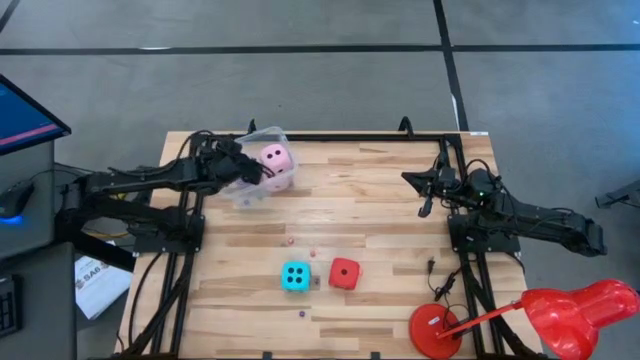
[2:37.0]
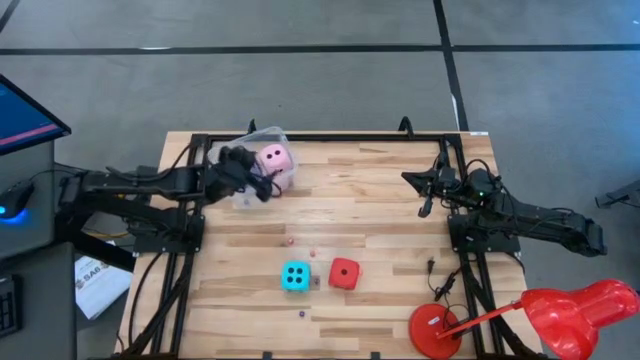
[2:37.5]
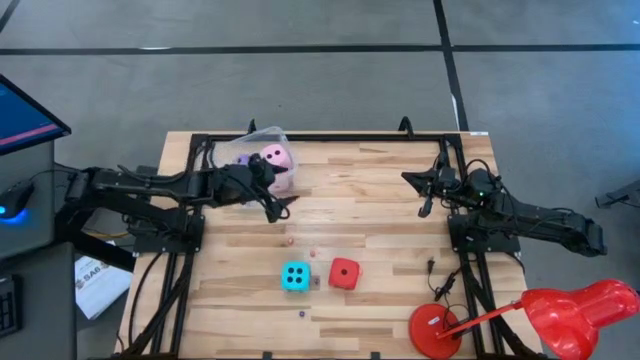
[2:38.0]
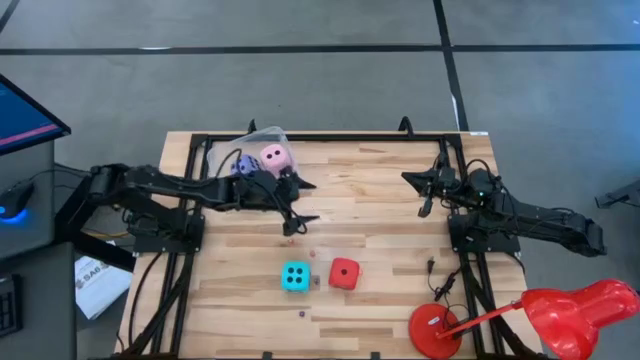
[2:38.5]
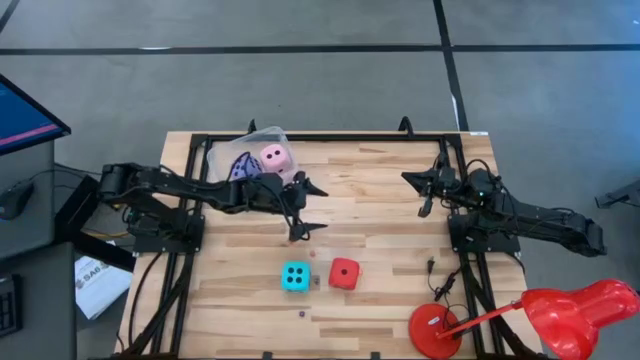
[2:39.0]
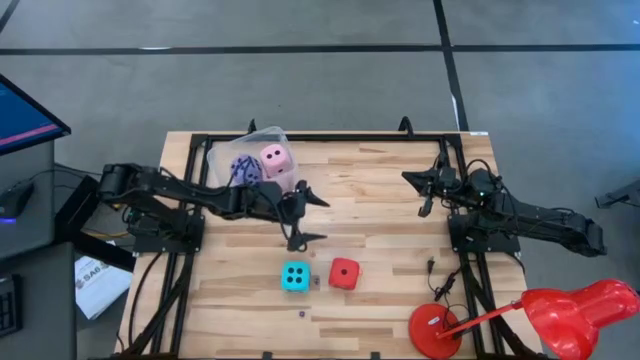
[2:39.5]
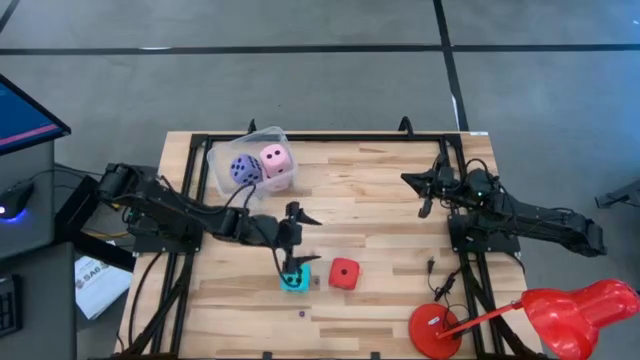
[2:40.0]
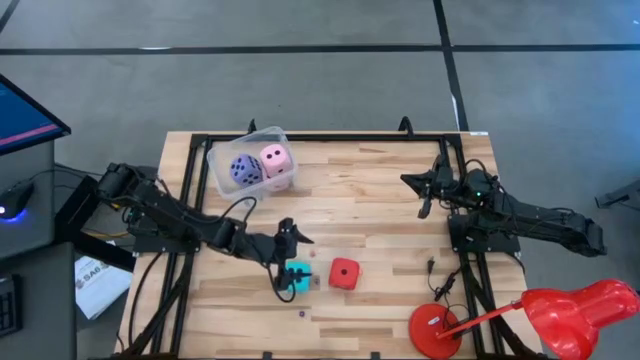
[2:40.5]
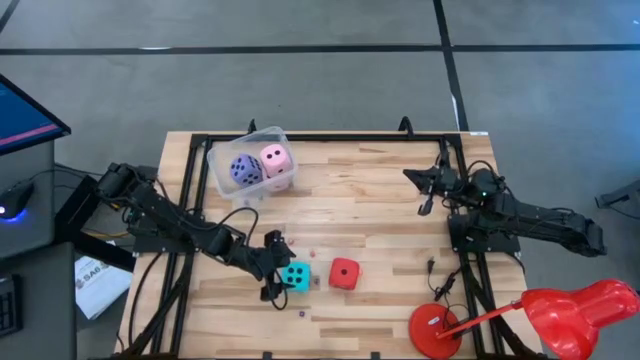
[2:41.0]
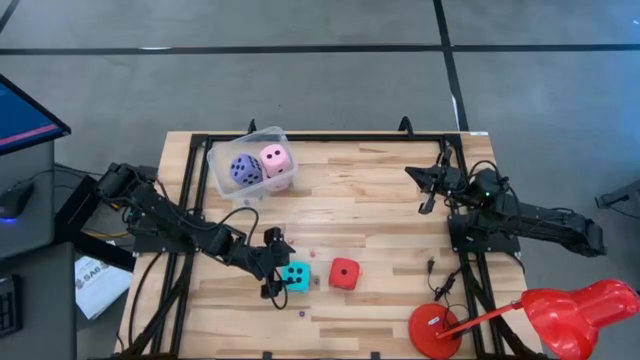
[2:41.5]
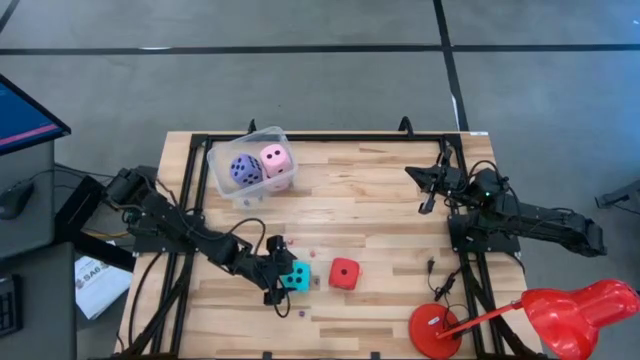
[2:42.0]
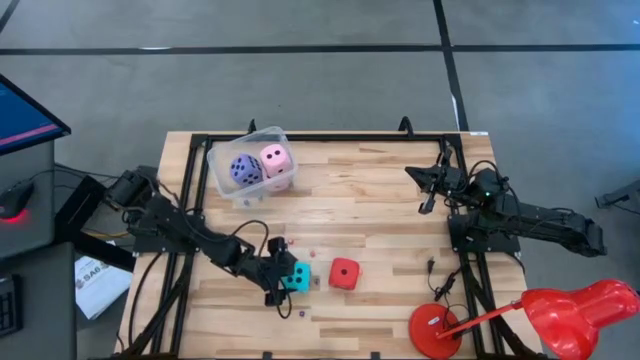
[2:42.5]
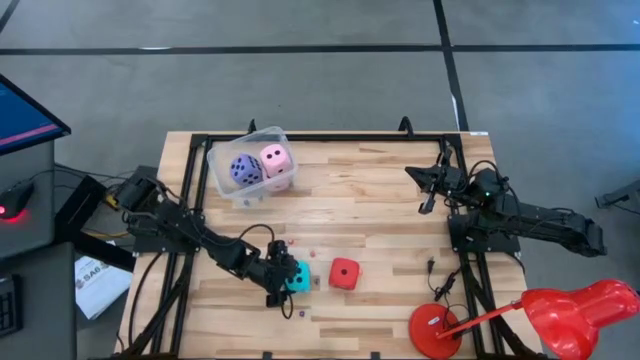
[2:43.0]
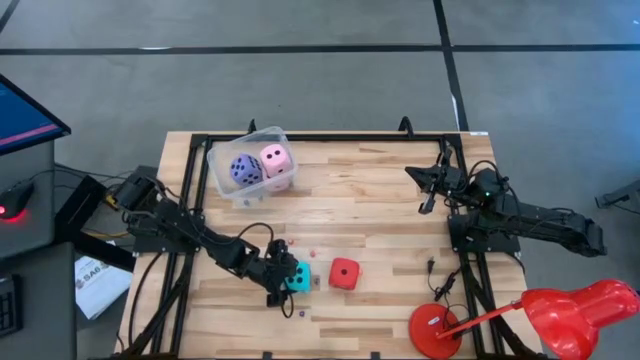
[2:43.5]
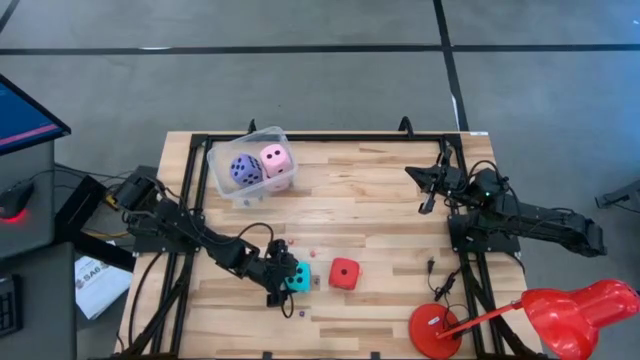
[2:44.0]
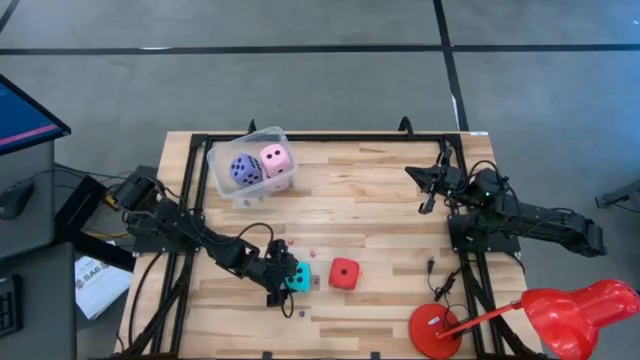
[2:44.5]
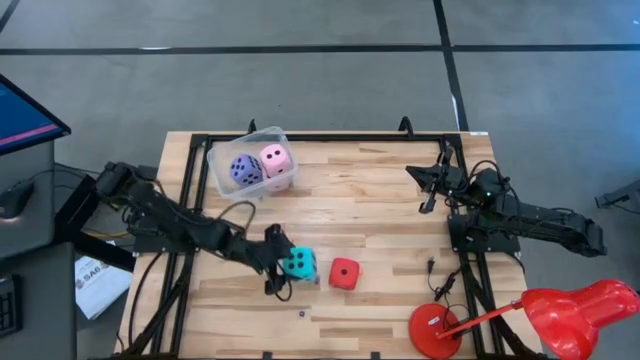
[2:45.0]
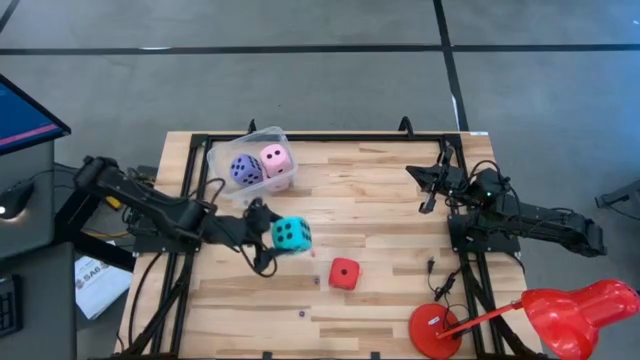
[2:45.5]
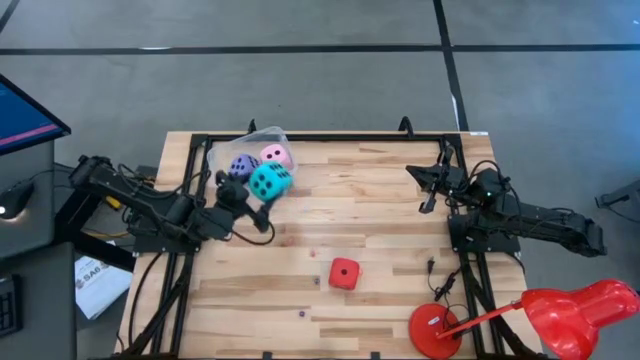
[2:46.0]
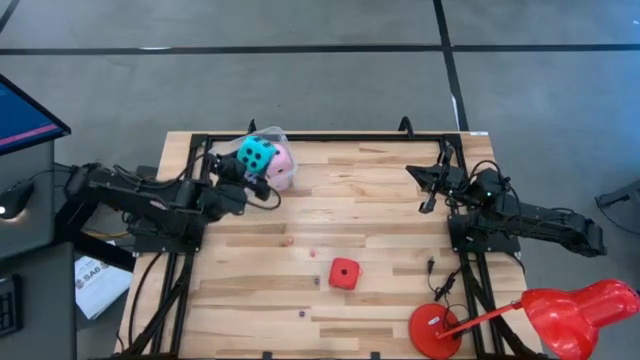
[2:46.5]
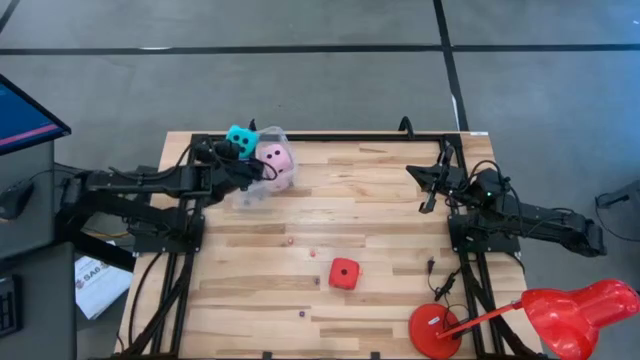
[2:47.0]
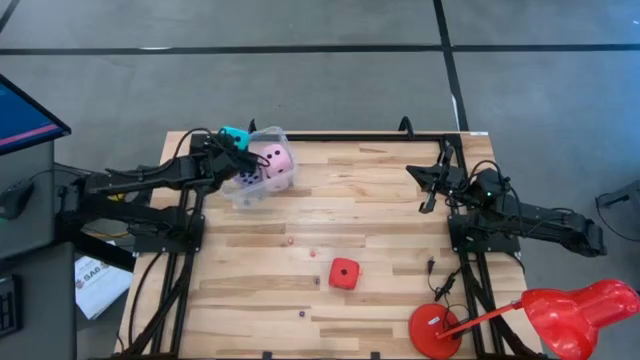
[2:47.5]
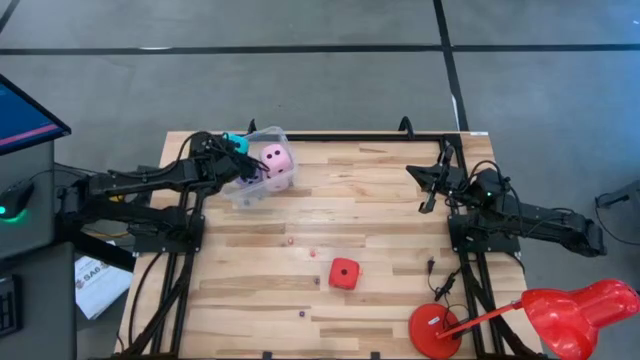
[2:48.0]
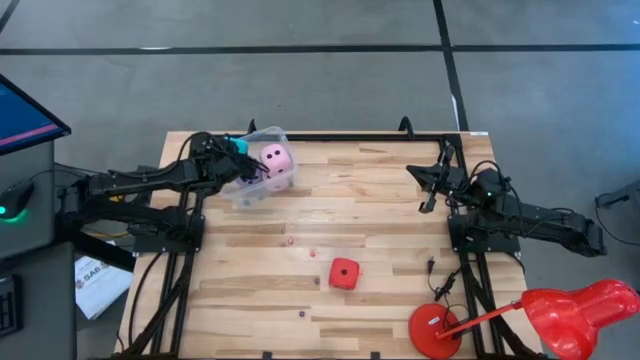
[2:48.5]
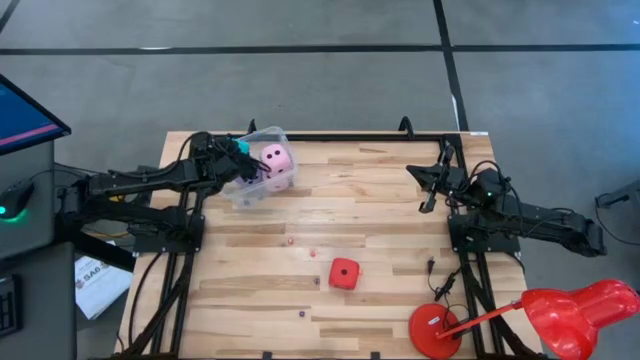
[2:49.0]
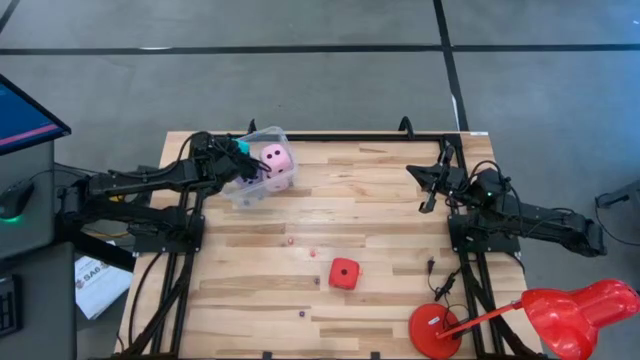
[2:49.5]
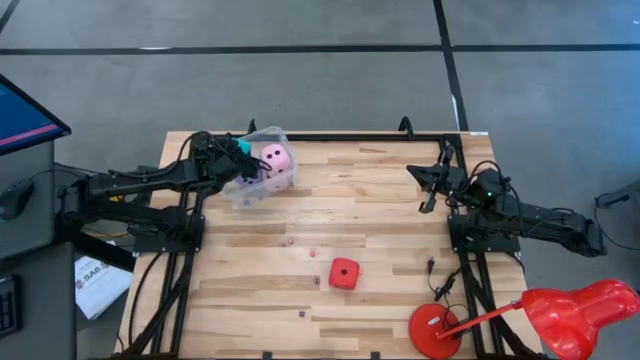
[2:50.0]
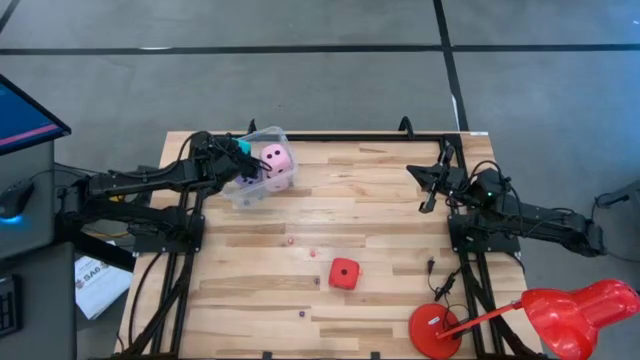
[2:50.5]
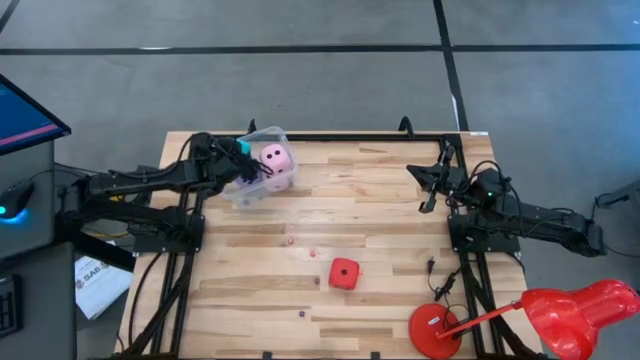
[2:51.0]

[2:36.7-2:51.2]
Task: Pick & Place Dice
Put the large green dice into the transparent container

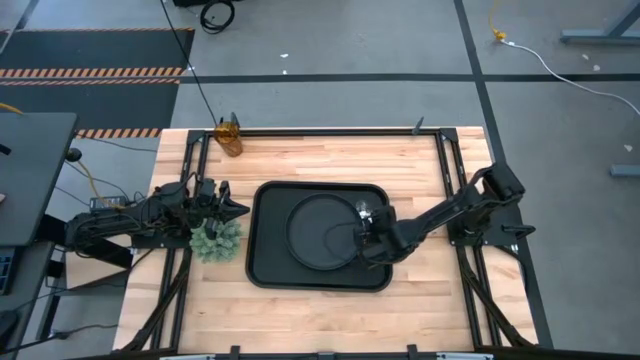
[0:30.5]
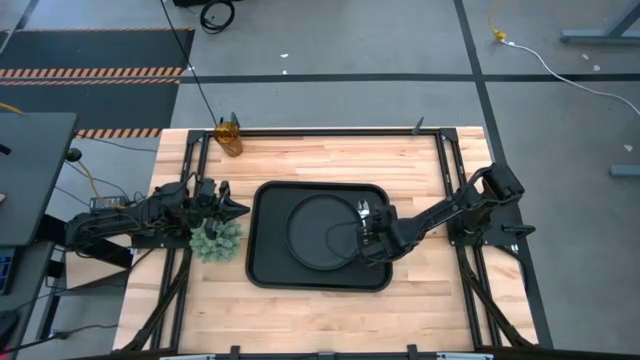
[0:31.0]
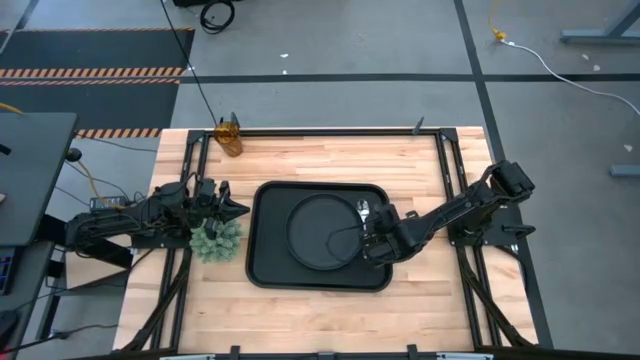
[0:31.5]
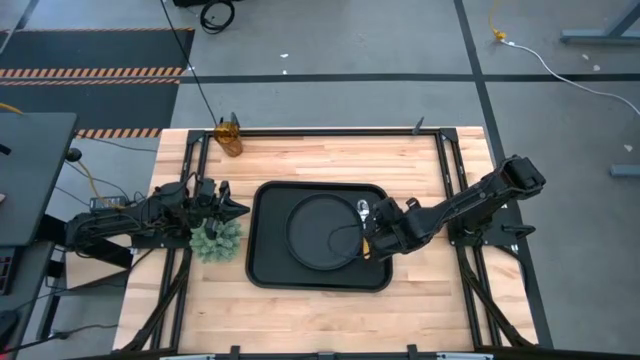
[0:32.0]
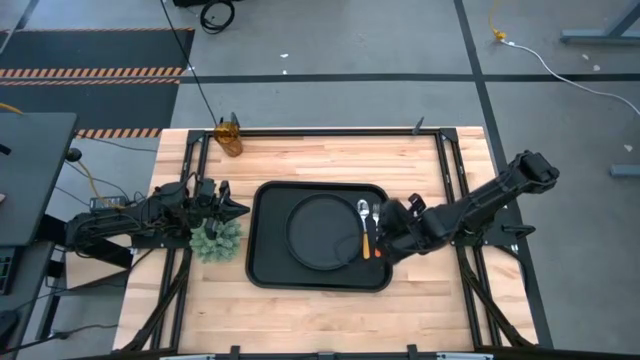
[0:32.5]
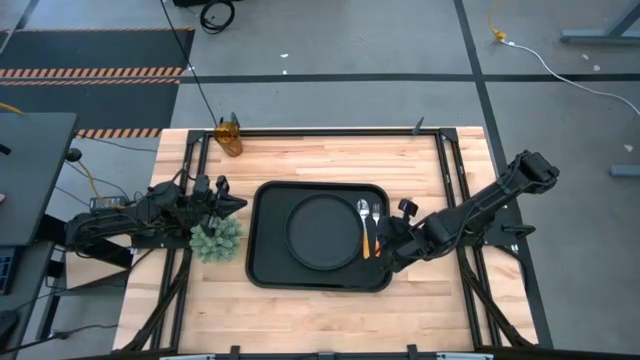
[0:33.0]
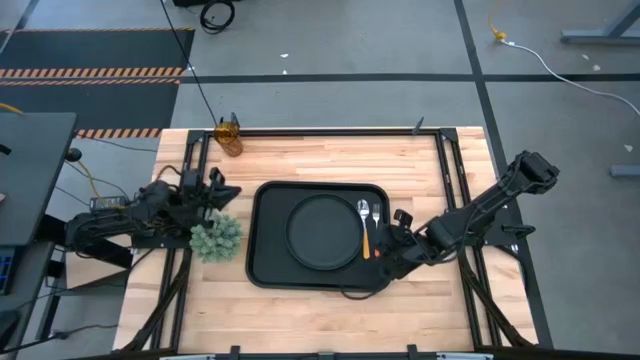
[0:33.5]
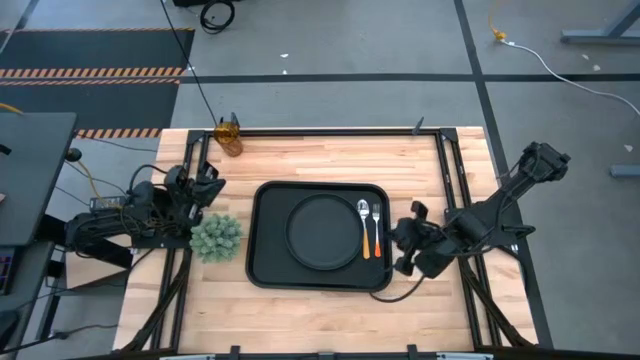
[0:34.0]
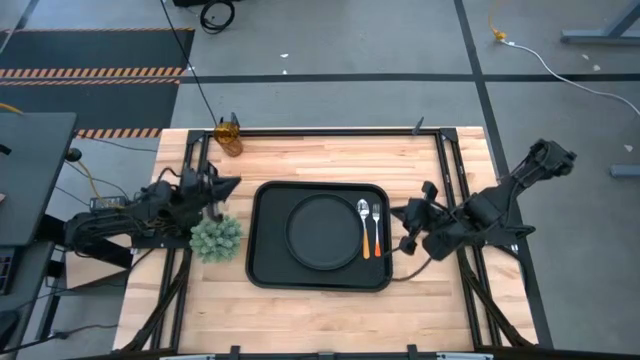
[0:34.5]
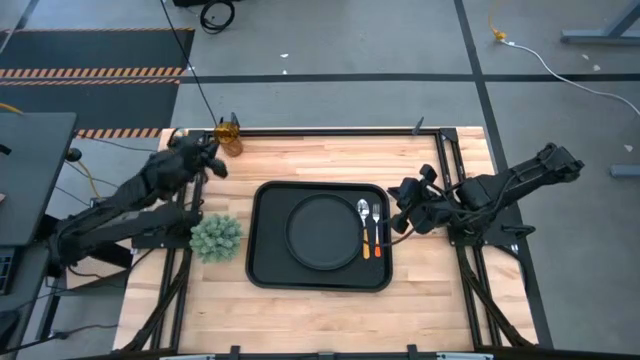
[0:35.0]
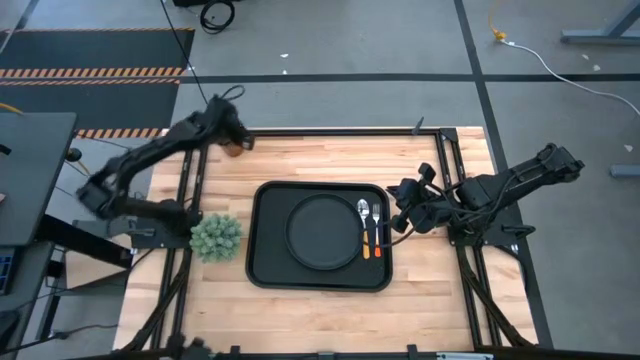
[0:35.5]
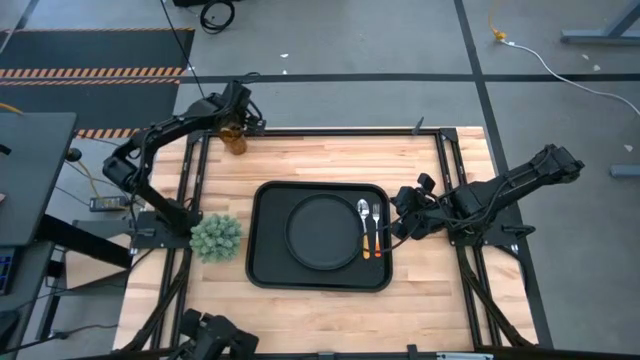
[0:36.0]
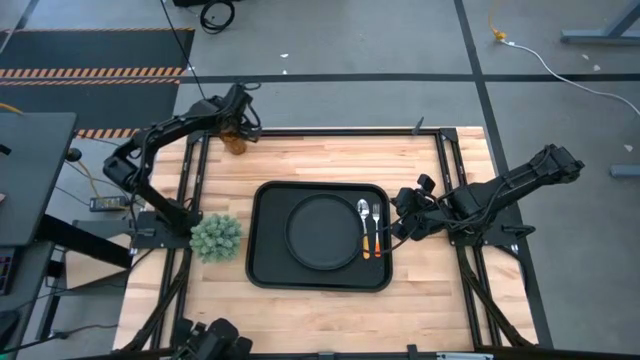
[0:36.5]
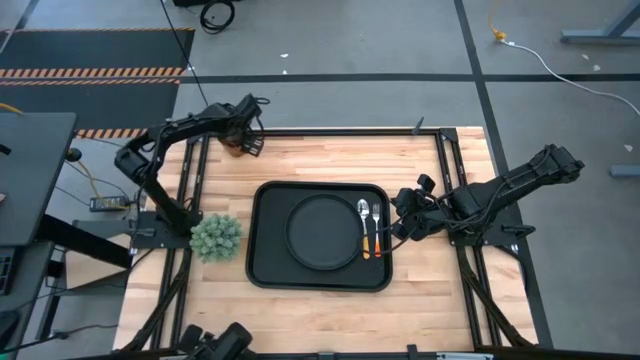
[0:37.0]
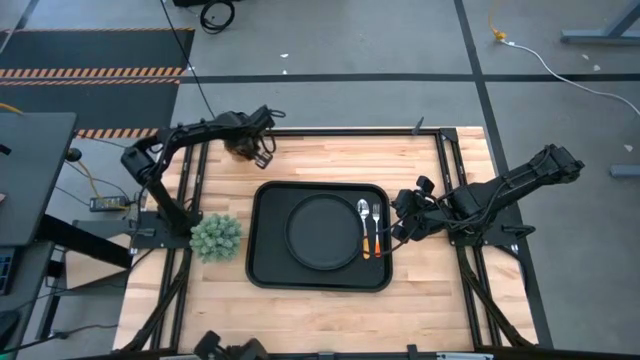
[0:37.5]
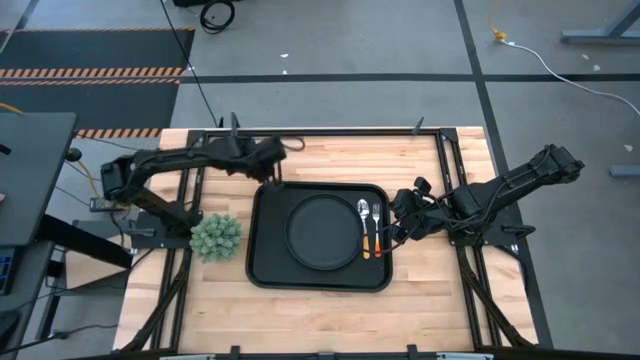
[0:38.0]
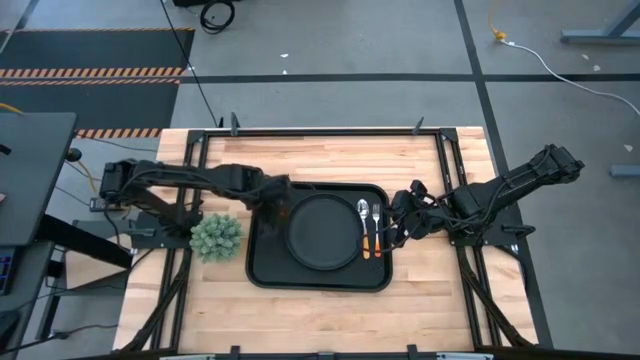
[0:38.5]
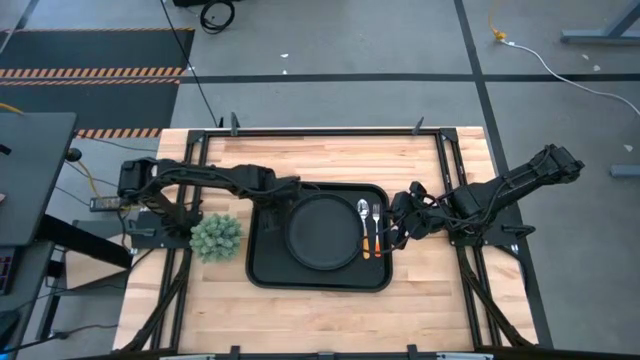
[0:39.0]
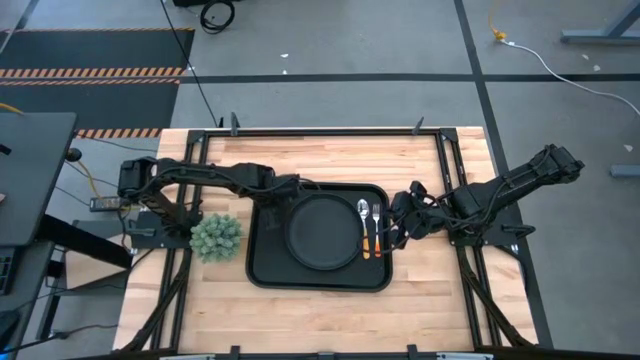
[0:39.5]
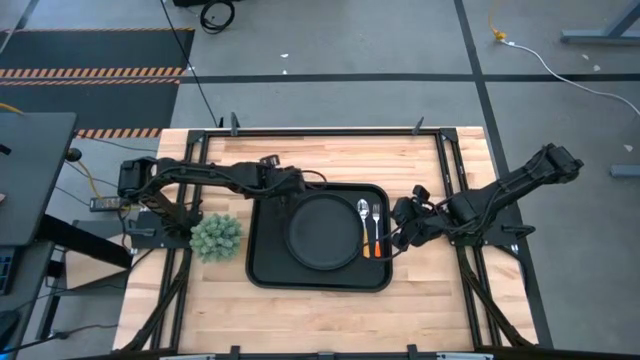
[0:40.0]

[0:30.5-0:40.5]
Task: Pick and place plate/cup/fork/spoon on tray
Put the orange cup on the black serving tray to the top left of the black plate
